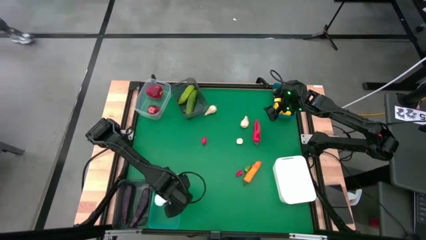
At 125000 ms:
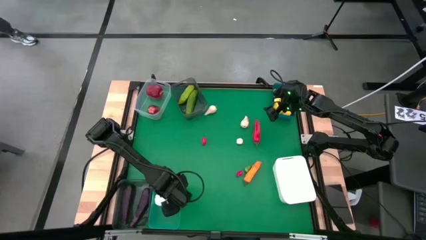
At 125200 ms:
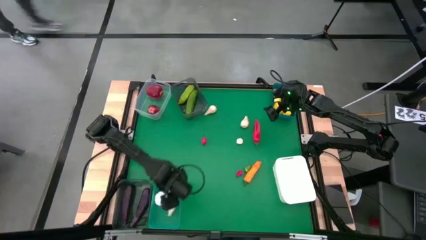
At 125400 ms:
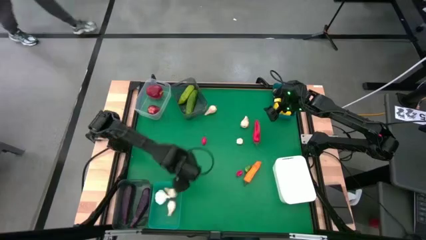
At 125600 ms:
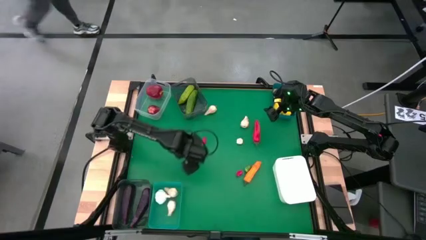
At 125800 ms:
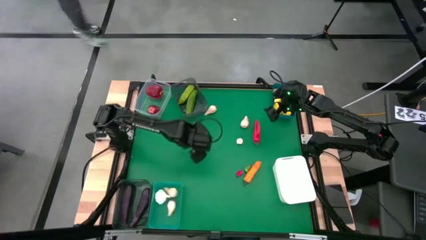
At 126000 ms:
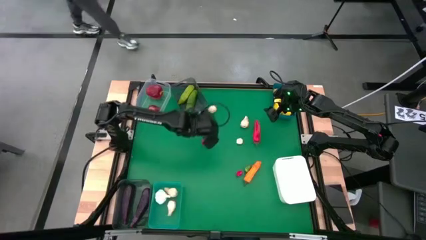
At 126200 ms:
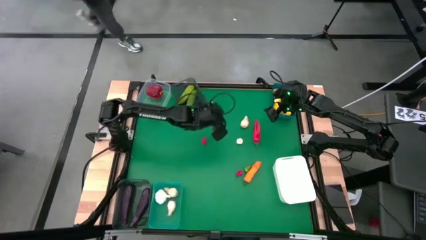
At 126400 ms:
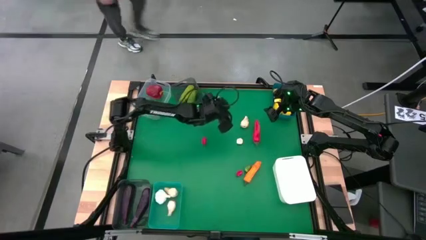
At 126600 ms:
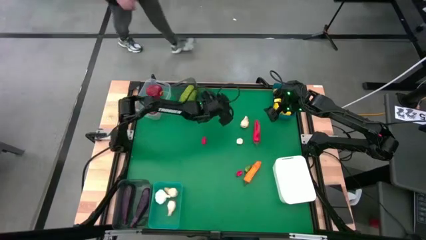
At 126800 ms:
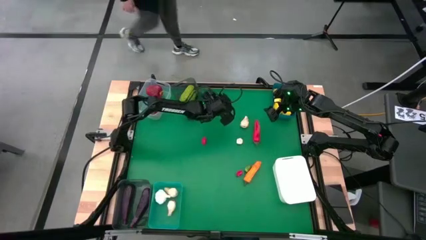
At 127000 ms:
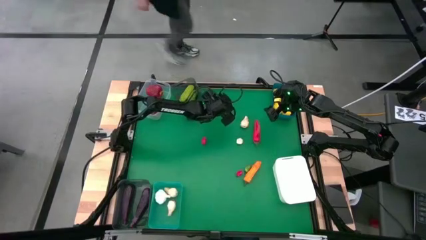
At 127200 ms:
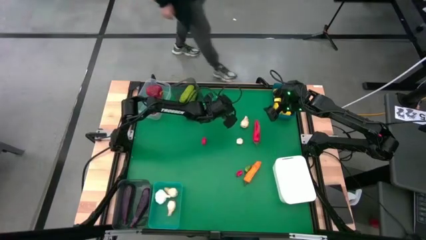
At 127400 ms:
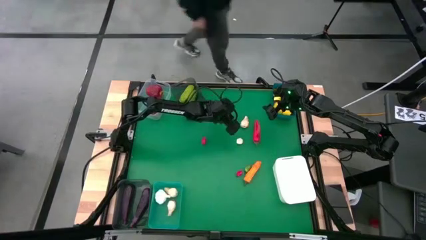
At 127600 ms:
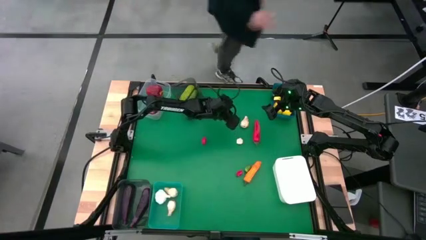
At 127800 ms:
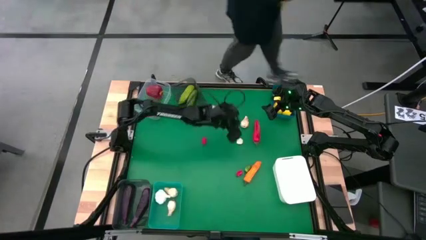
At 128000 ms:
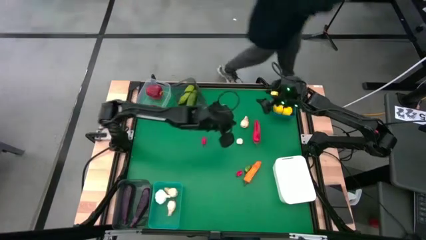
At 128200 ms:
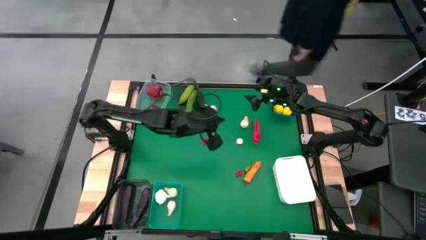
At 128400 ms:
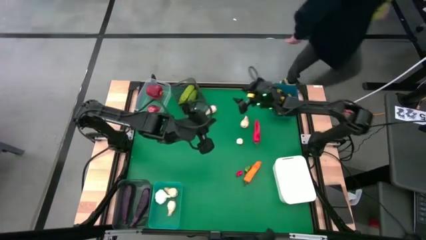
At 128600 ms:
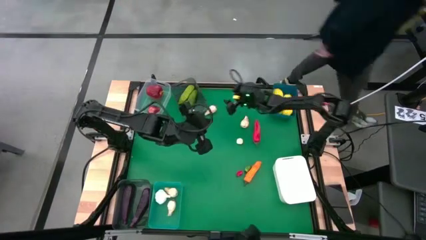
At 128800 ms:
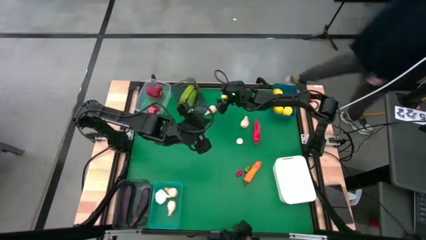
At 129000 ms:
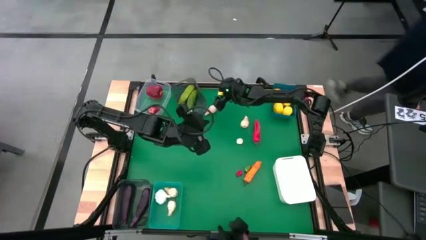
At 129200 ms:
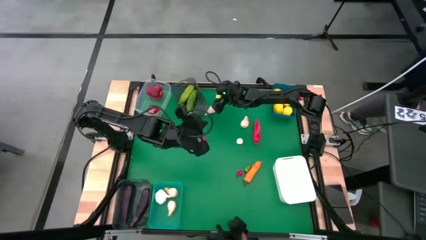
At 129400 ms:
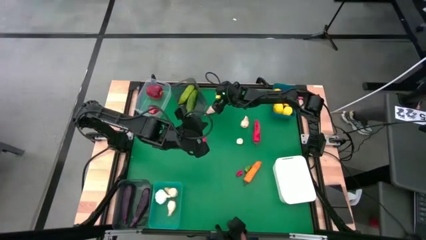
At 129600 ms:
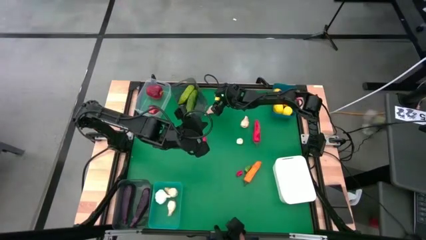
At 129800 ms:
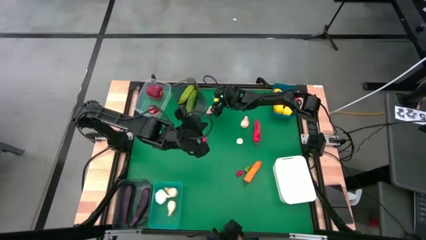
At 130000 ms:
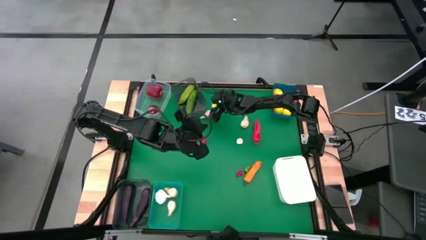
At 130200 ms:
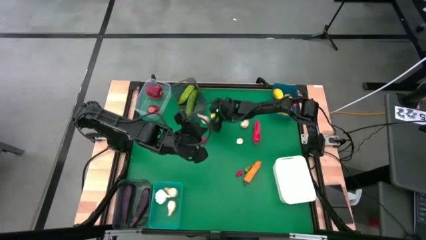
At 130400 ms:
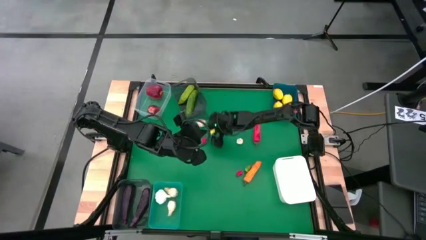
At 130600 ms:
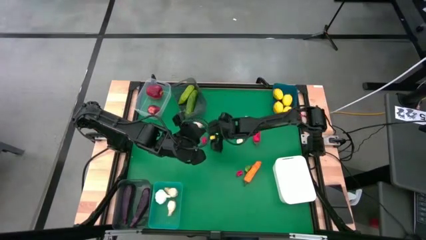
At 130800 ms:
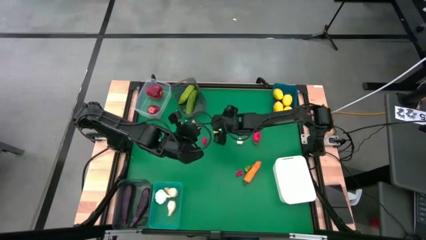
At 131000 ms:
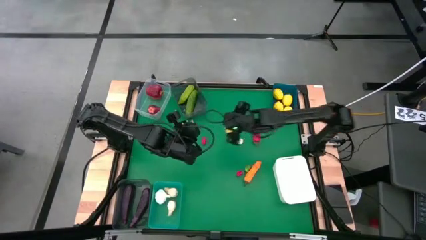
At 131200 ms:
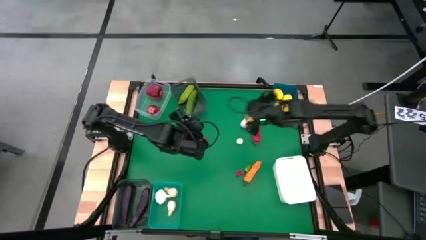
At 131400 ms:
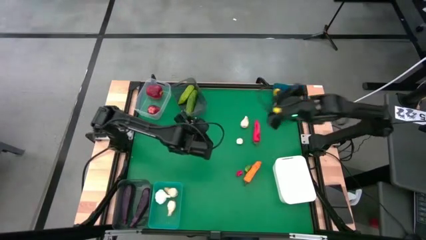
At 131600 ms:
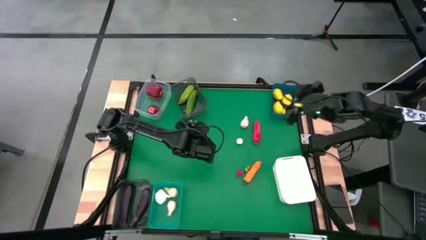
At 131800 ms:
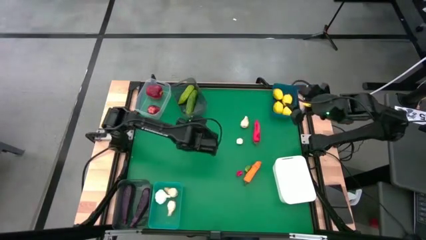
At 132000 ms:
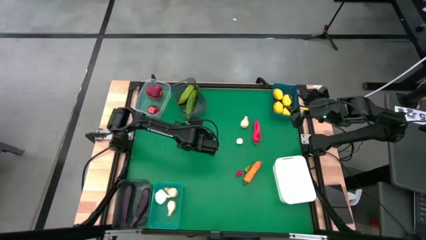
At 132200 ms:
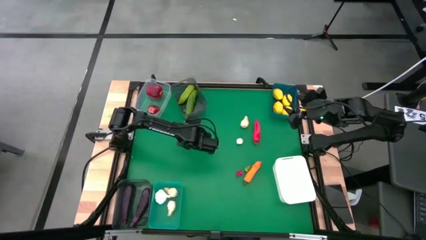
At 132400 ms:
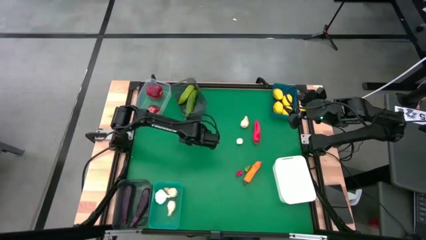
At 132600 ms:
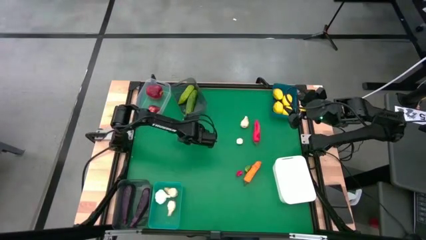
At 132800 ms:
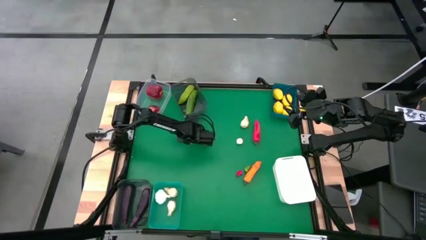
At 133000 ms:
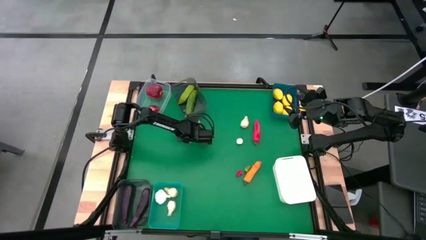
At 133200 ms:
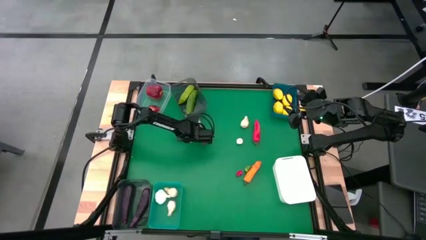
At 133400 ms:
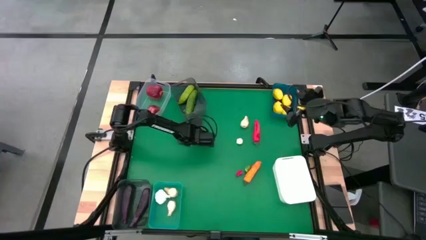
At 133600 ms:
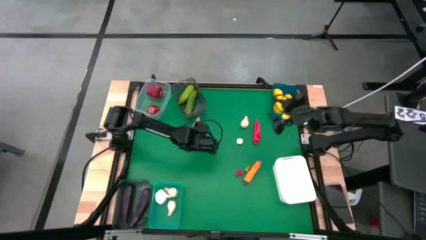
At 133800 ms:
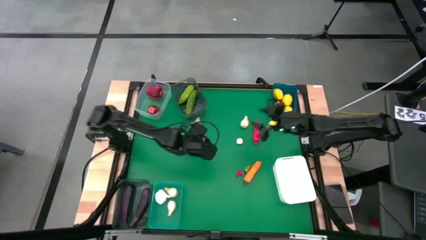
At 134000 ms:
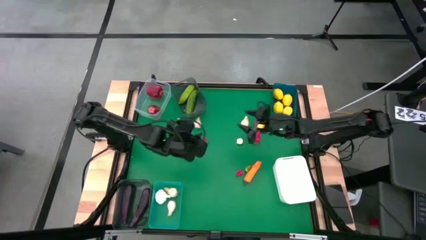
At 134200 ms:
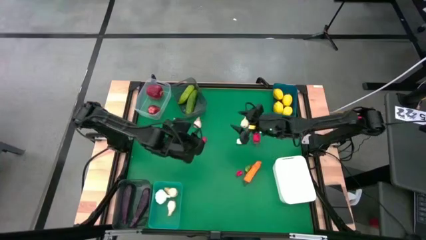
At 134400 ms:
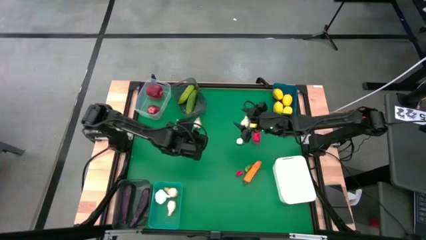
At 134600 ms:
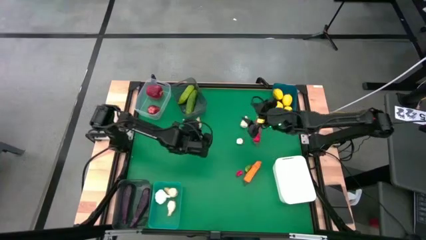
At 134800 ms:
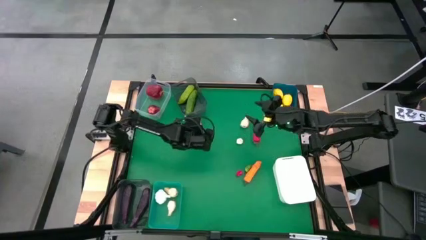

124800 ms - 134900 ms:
Task: Sort produce into baskets
Put the garlic into the green bin

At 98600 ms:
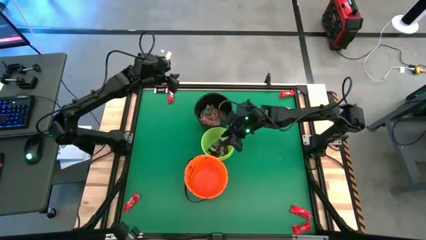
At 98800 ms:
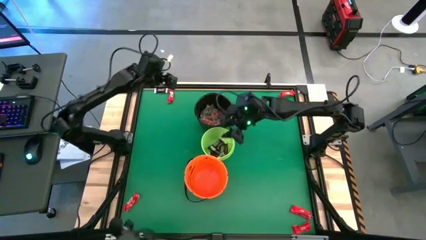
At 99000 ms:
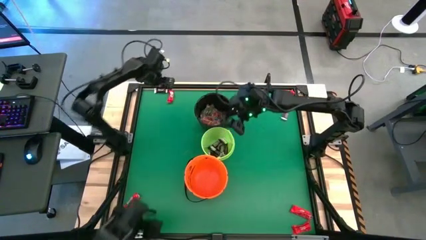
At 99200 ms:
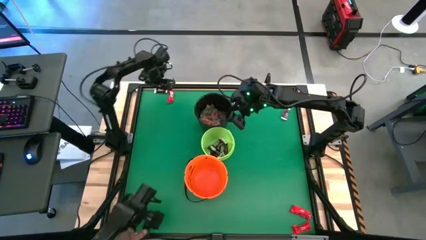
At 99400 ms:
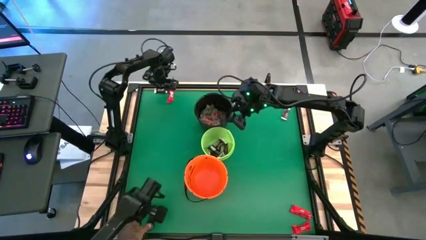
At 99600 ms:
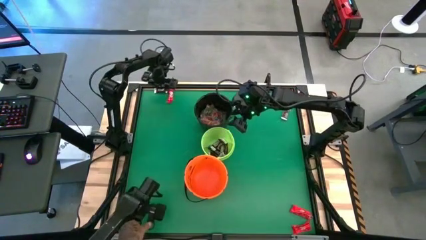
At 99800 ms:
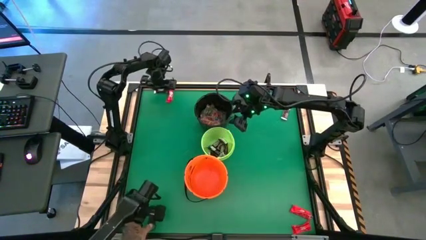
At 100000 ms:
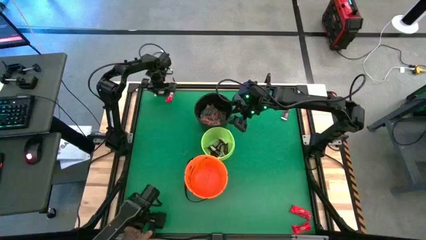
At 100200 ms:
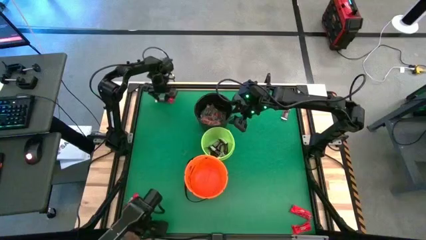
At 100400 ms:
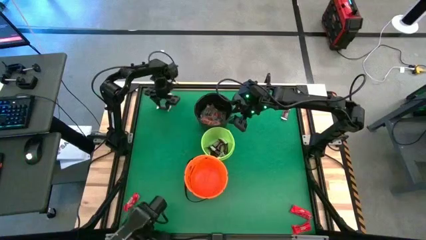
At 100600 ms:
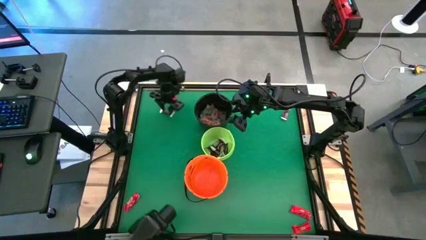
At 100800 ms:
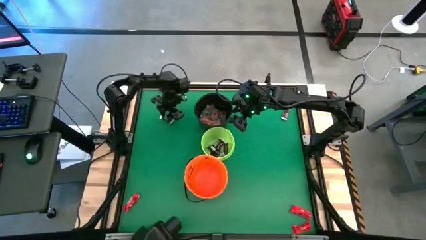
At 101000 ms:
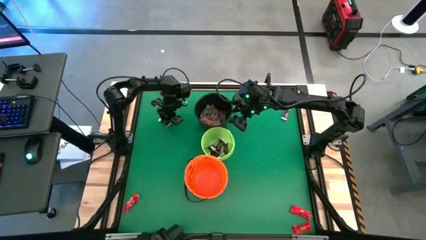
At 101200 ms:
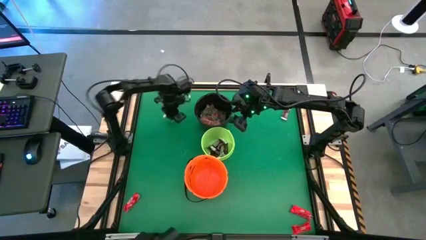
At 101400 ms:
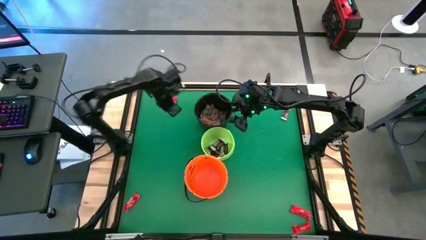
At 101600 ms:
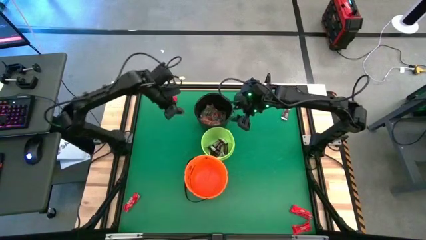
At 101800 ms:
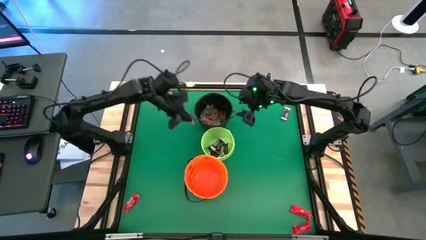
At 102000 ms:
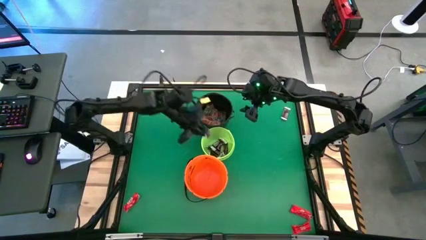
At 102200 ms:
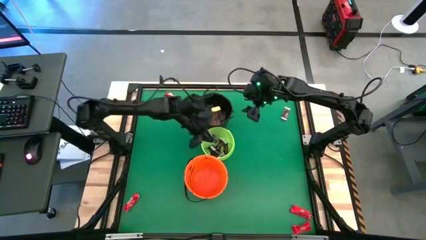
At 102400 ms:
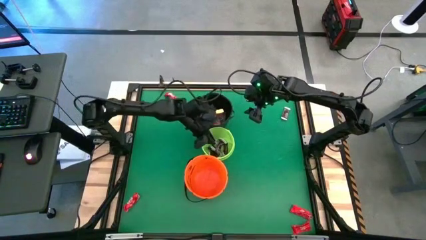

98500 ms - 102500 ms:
Task: Sort candy by brand, put in halloween buckets
Put the brown chocolate bar into the green bucket

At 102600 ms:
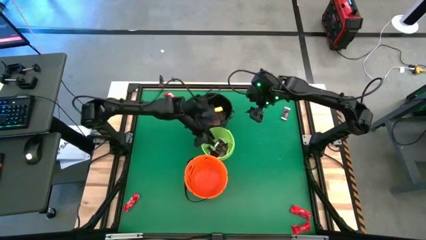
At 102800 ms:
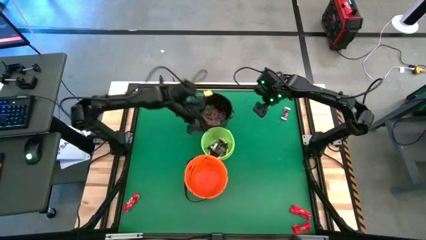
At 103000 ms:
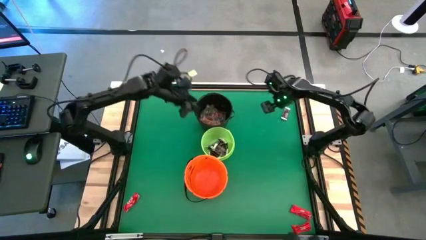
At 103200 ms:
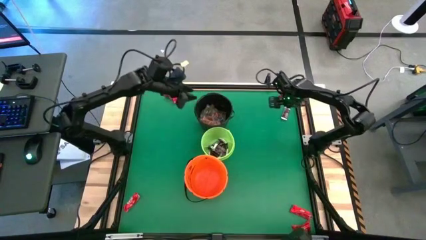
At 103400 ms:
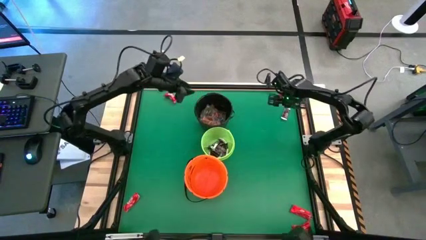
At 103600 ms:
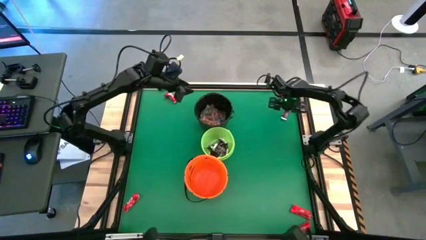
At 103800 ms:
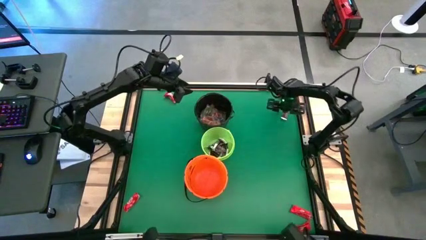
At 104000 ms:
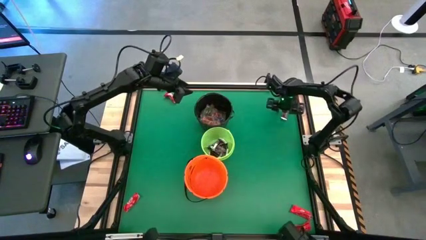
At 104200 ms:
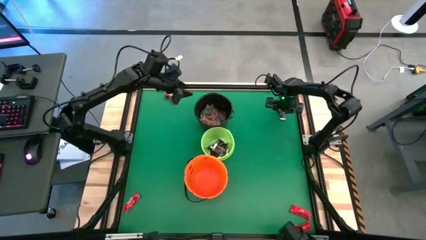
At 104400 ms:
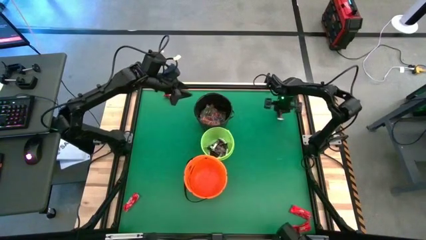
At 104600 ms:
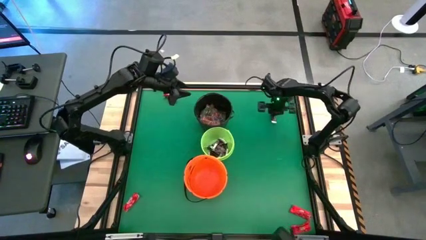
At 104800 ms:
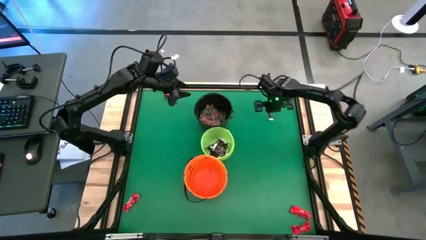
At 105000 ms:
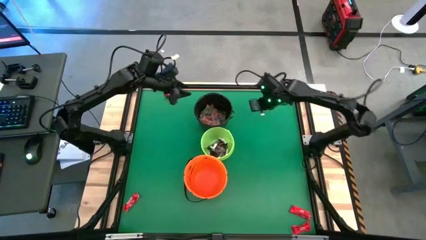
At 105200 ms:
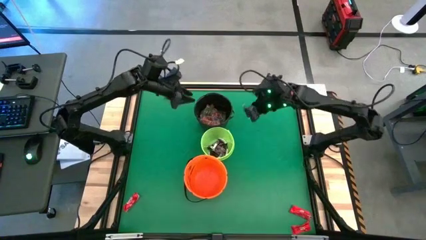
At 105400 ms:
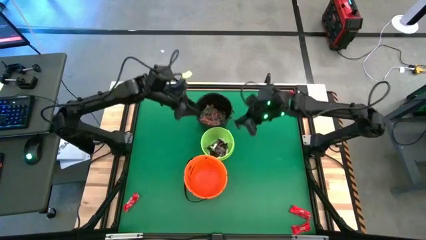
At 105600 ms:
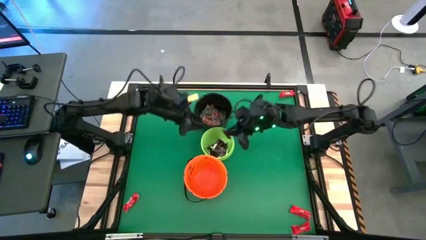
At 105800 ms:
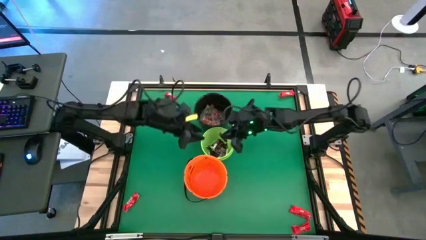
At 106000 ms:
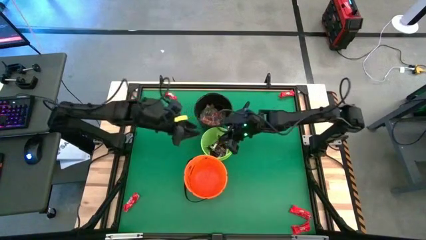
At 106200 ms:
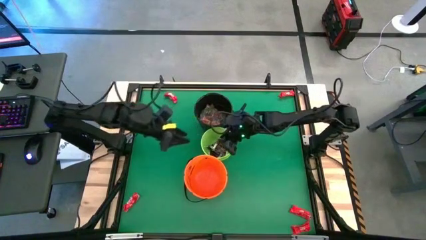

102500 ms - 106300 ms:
Put the brown chocolate bar into the green bucket
